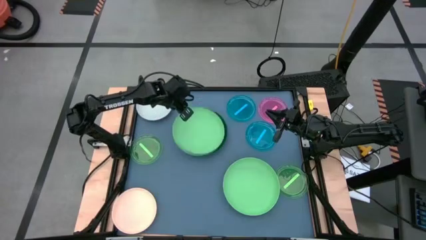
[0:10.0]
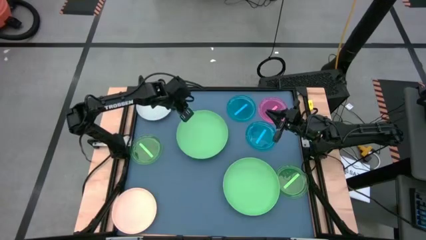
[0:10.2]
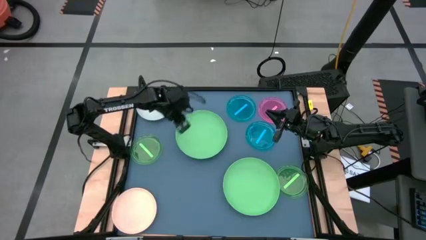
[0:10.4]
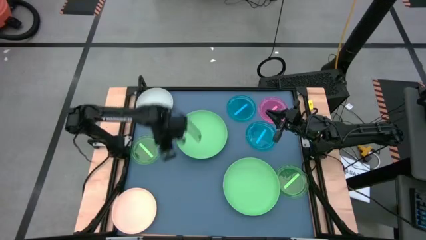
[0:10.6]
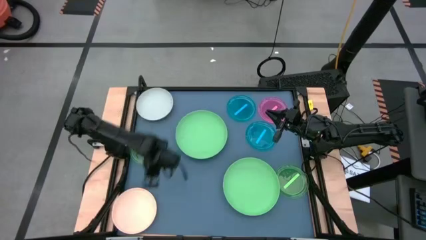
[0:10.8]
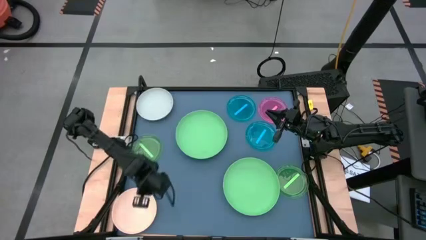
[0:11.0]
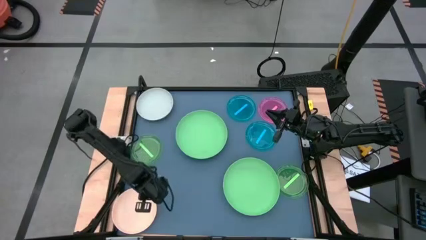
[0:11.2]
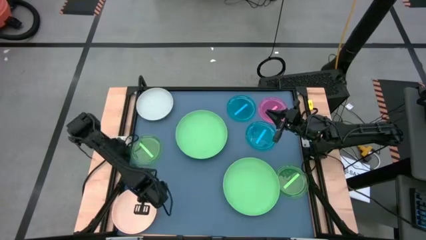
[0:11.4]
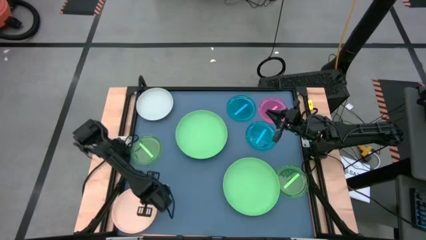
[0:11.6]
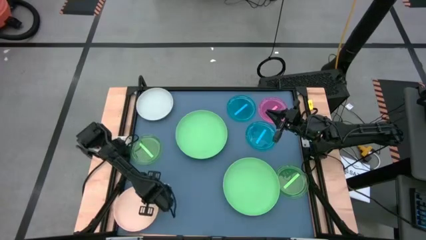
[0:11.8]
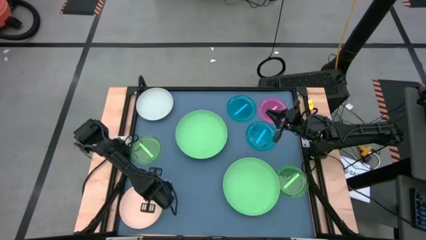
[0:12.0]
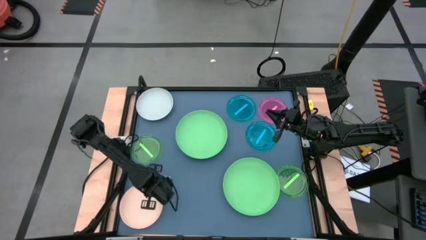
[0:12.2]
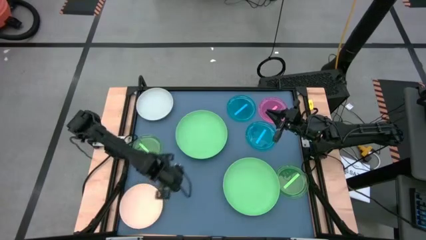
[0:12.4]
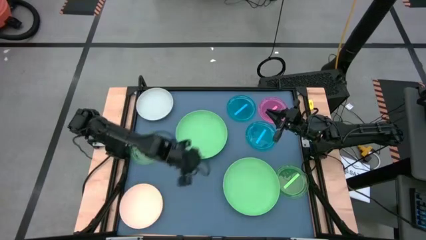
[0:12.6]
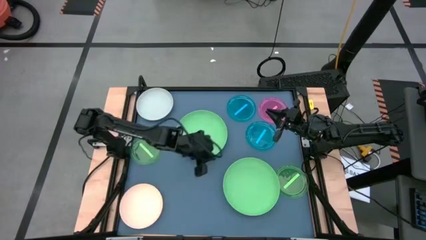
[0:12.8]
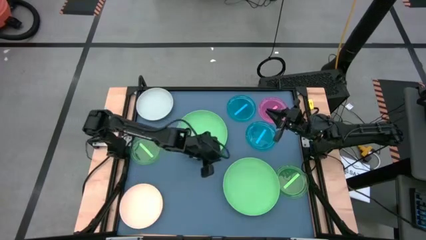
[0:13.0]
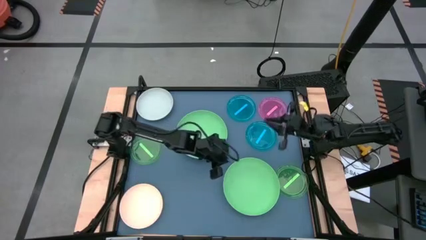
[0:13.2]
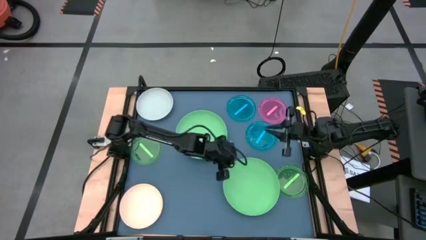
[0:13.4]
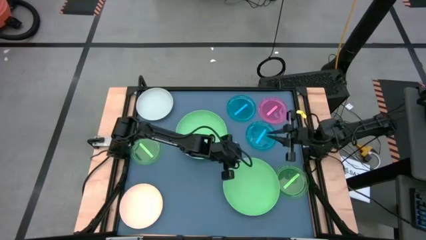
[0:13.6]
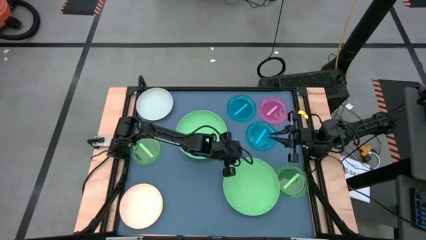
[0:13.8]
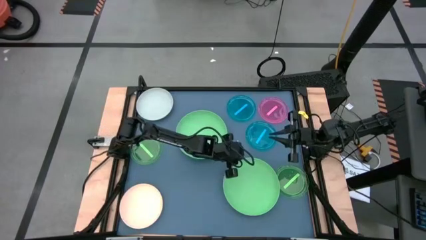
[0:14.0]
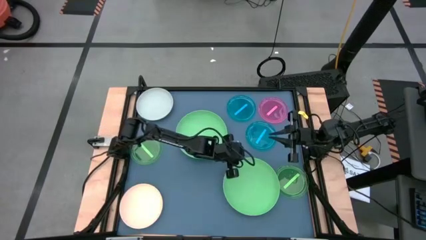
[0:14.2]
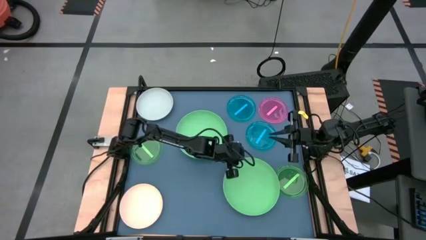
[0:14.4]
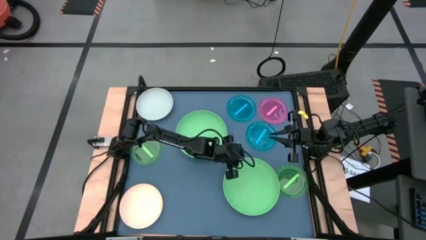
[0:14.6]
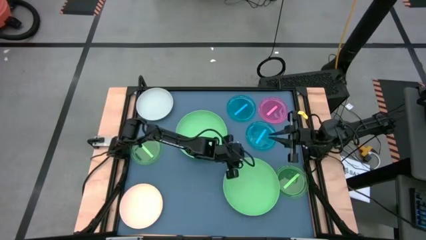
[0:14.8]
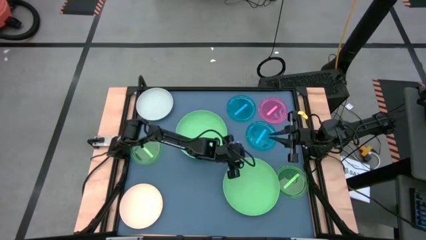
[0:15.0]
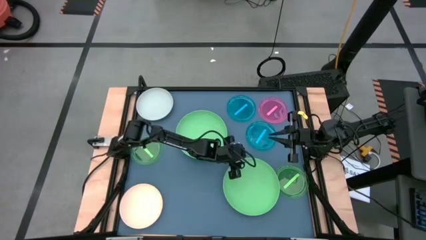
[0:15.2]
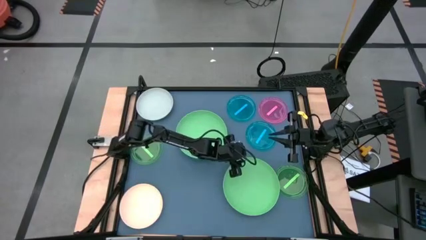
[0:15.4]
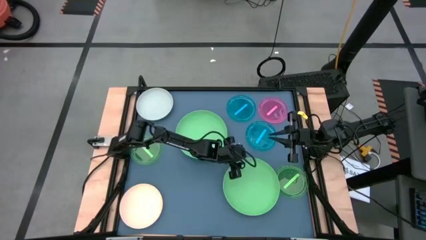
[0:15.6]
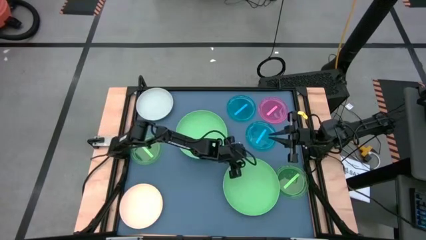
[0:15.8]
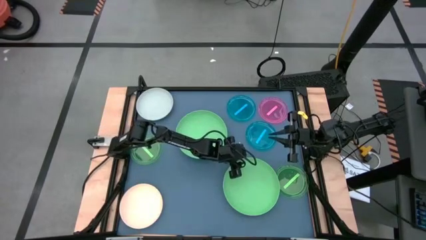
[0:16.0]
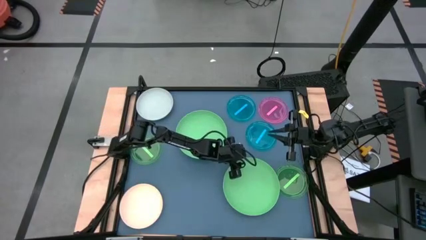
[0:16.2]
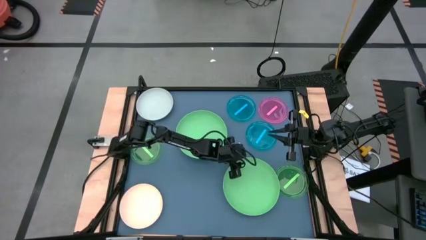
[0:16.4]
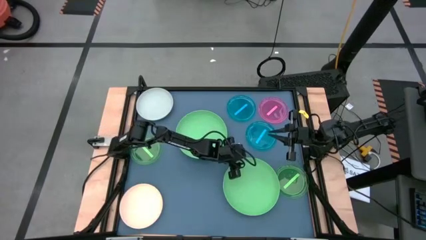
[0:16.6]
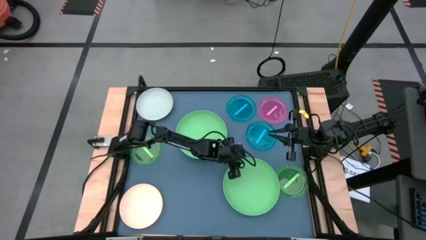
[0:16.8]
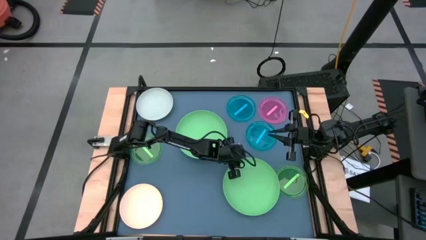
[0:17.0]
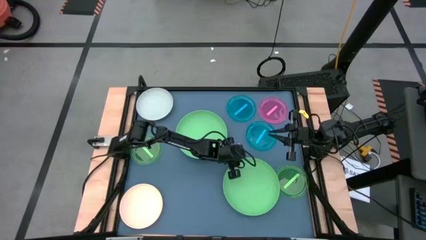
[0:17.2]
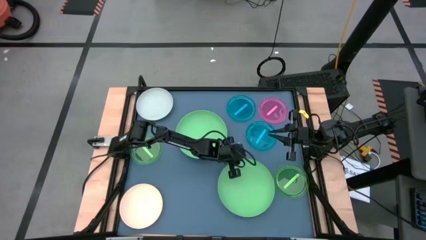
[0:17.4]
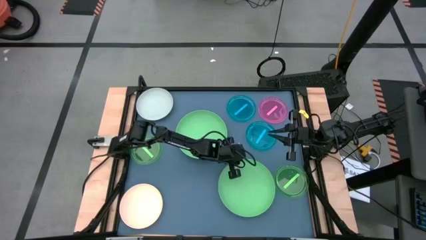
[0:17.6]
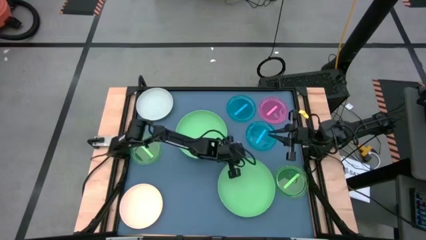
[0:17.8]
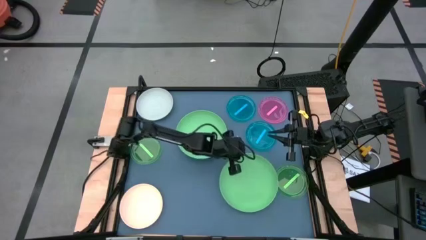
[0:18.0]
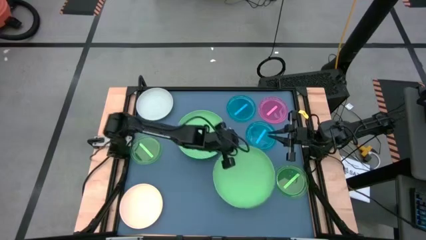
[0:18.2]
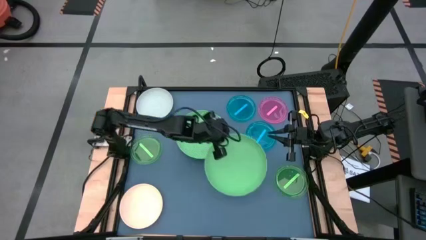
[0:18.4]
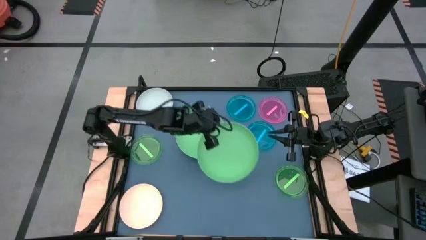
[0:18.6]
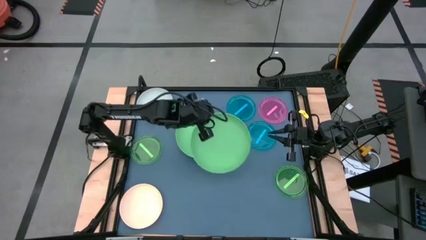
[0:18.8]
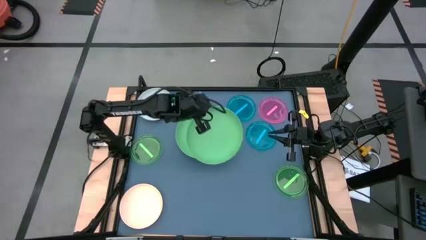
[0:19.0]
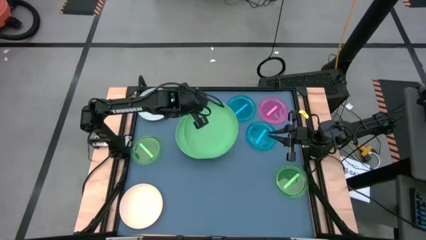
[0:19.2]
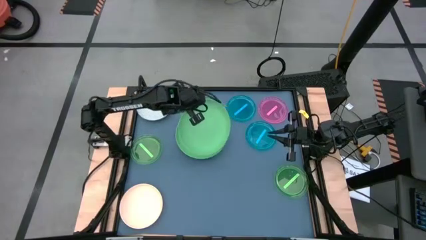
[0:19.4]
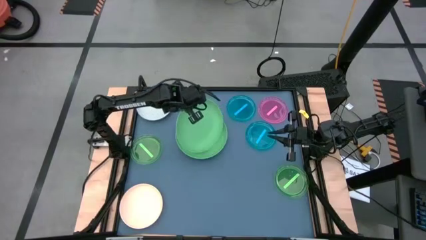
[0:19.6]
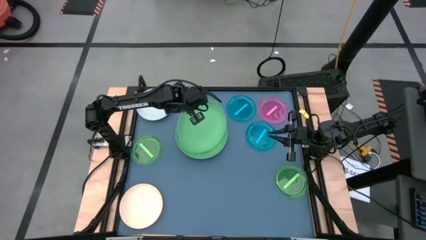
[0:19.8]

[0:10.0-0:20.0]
Task: Stack plastic plates
Stack the green plate on top of the green plate

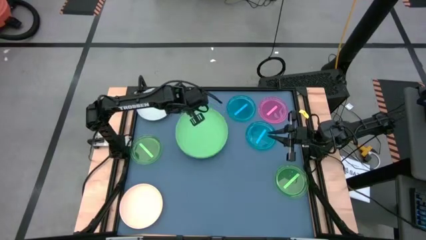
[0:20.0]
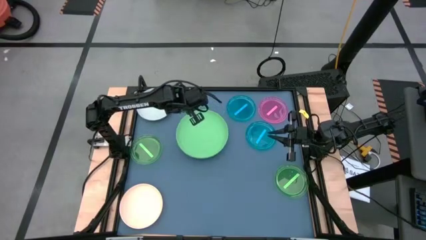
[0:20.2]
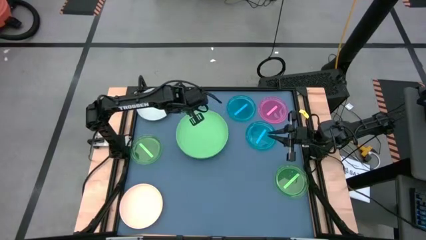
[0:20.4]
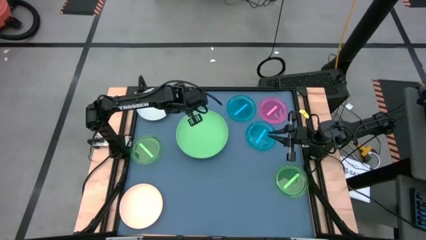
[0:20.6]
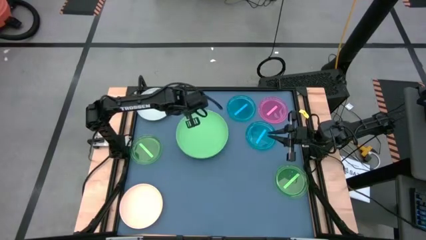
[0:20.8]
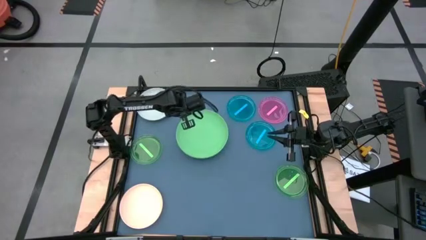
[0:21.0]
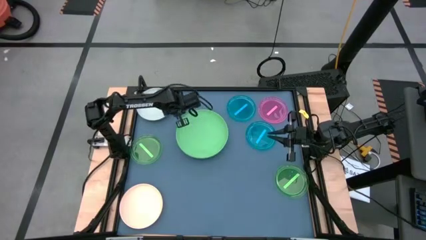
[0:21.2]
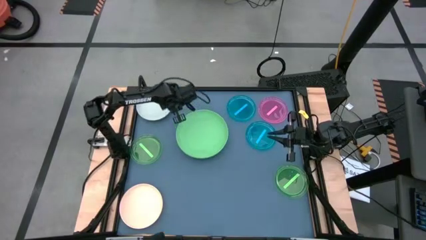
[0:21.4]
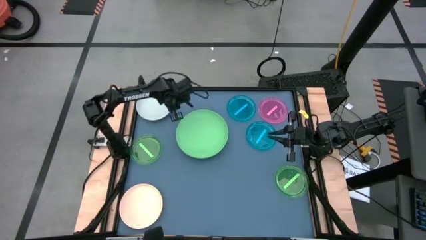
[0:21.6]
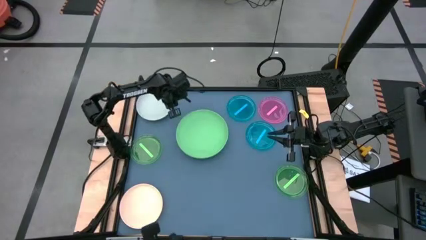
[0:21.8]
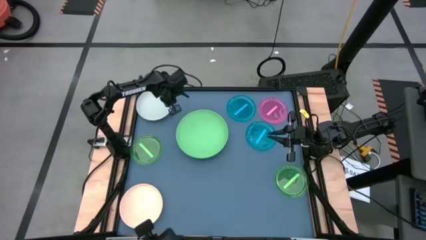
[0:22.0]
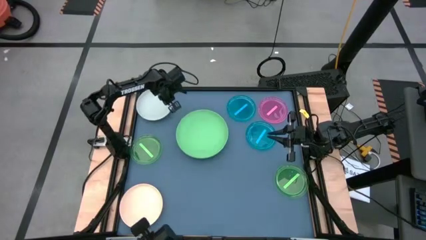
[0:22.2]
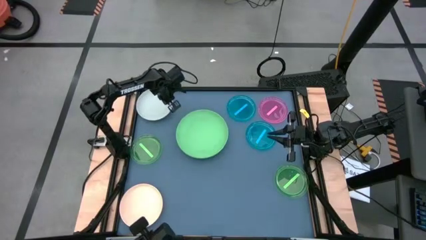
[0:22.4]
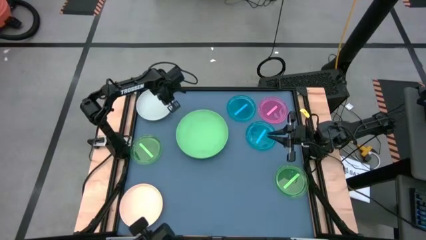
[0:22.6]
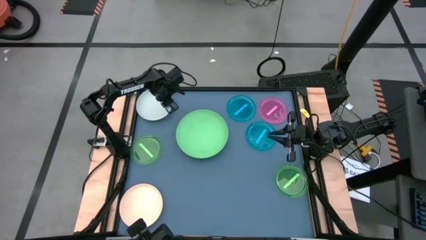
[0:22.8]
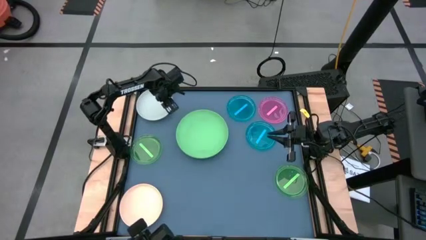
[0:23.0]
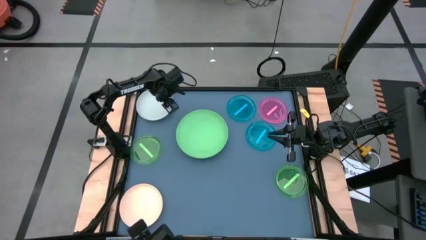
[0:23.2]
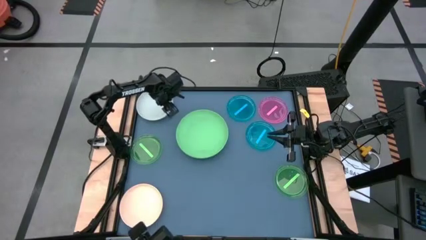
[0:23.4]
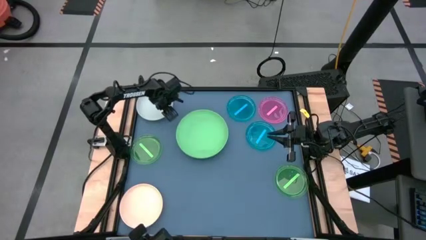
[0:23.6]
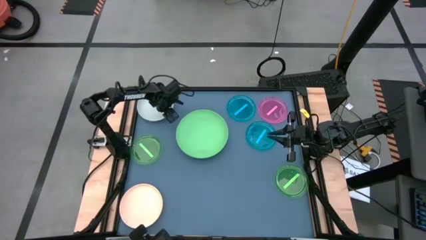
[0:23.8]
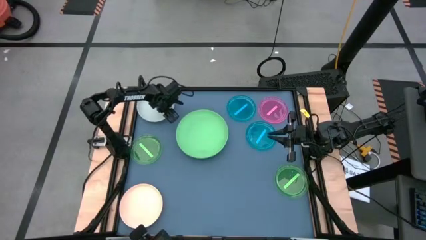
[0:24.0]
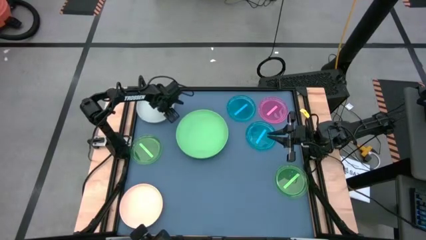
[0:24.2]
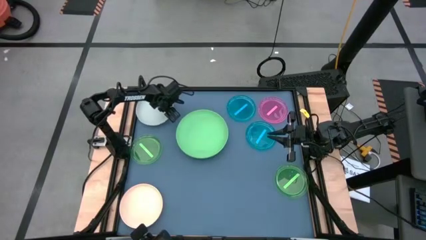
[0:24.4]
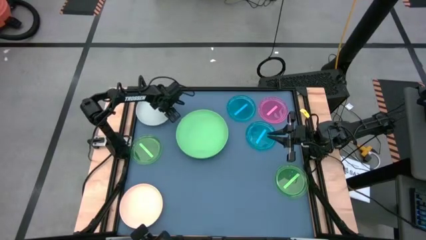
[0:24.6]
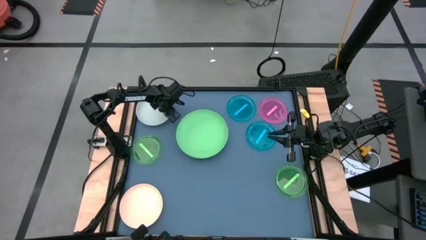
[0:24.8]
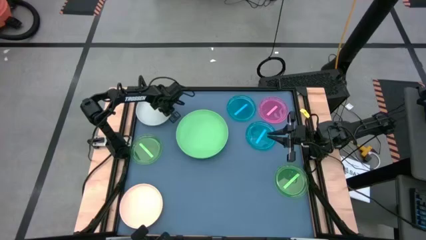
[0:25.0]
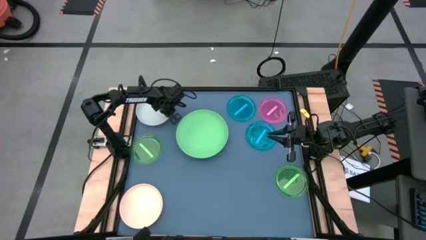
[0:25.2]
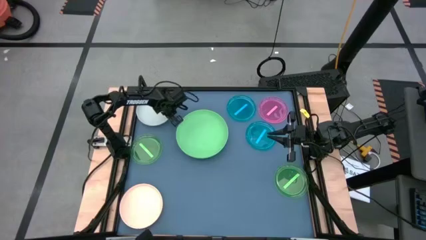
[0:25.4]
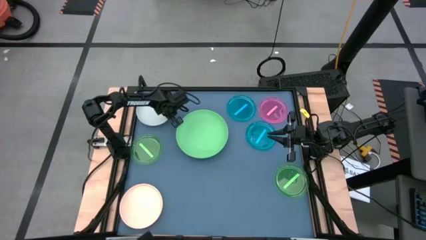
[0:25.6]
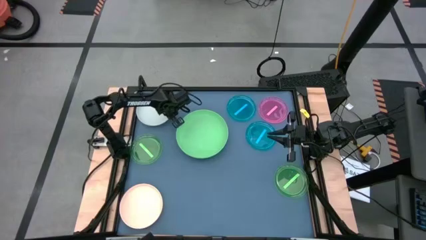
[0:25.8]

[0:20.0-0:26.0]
Stack the white plate on top of the green plate
